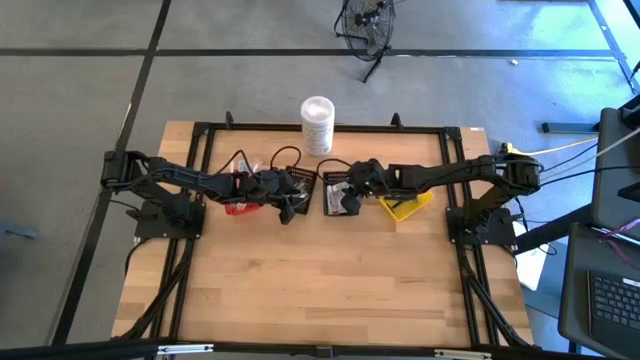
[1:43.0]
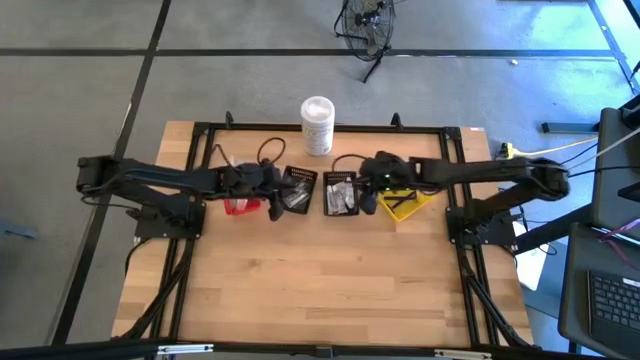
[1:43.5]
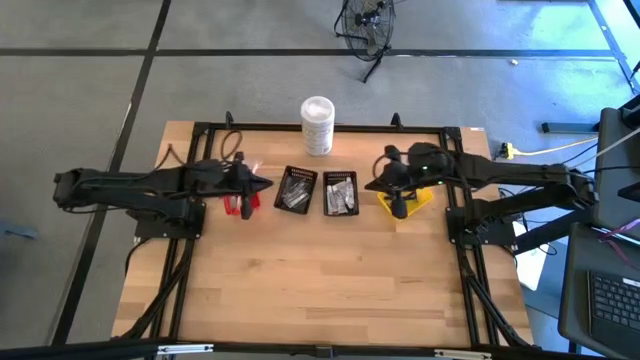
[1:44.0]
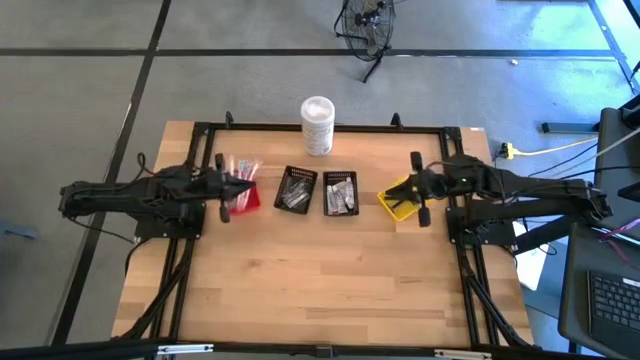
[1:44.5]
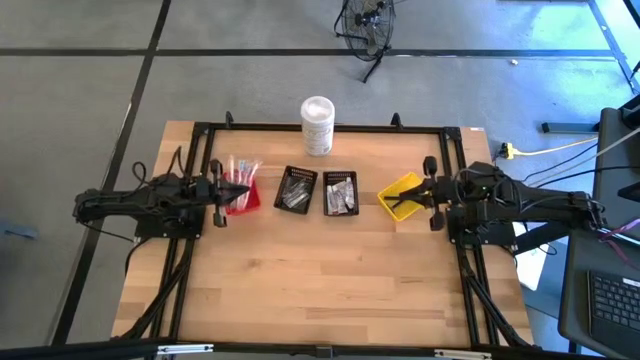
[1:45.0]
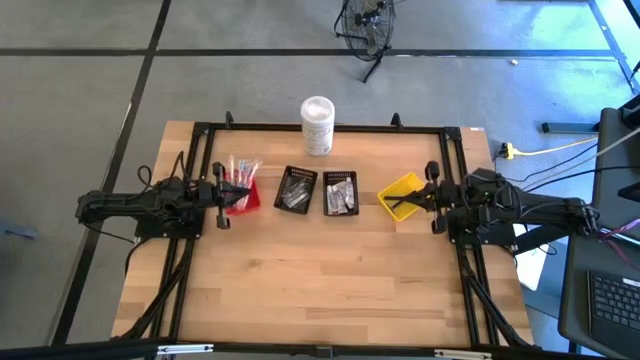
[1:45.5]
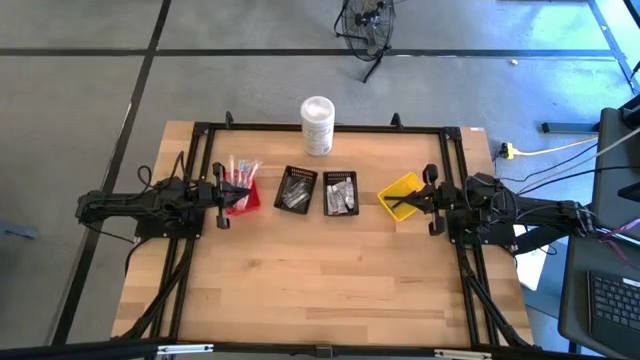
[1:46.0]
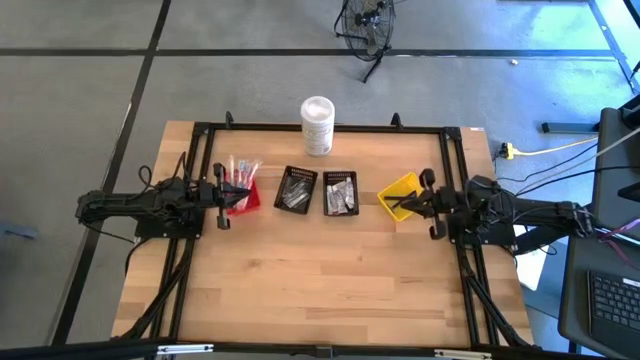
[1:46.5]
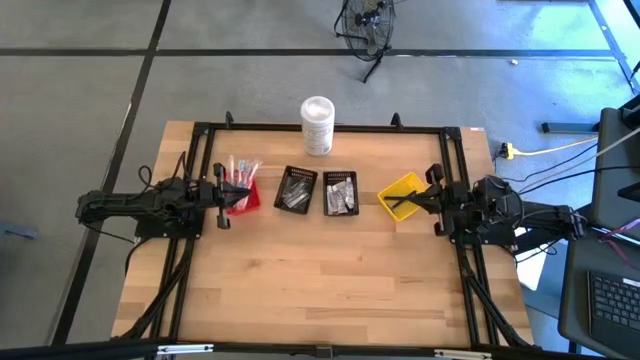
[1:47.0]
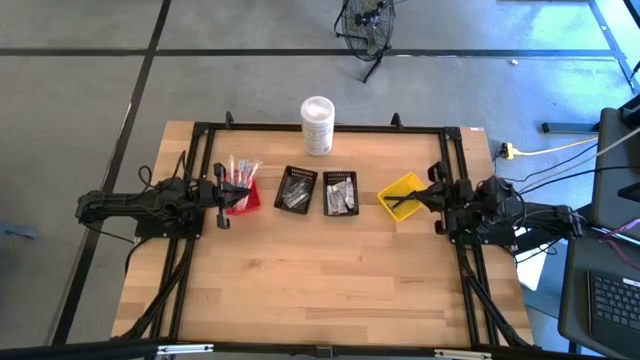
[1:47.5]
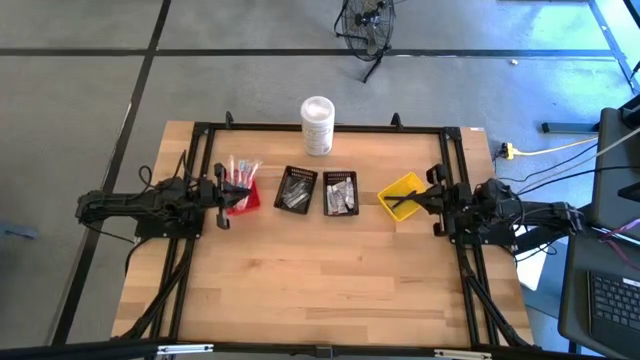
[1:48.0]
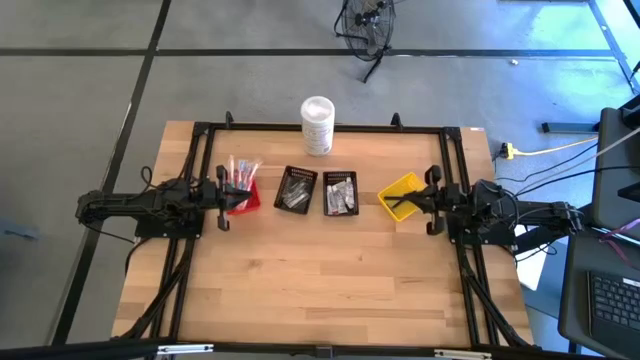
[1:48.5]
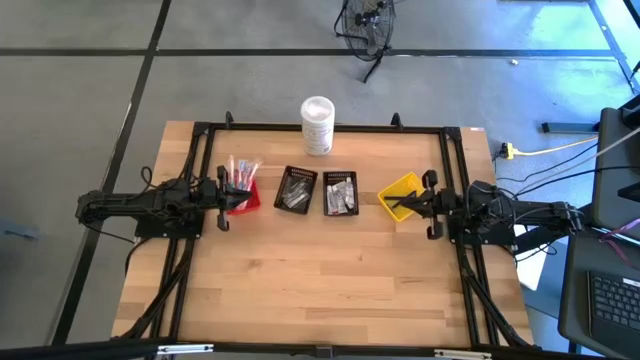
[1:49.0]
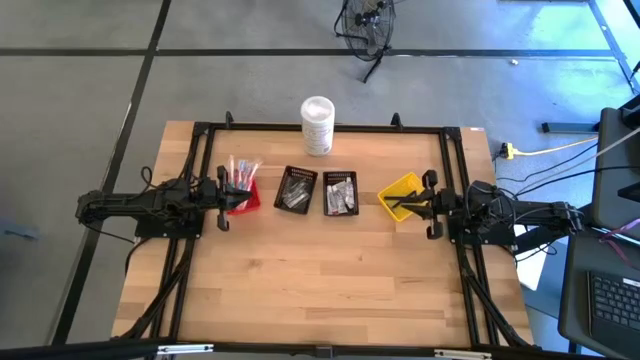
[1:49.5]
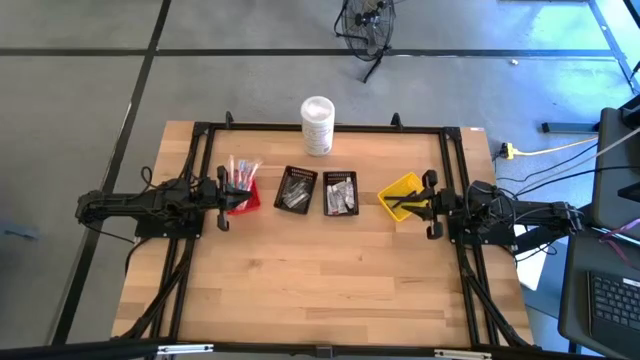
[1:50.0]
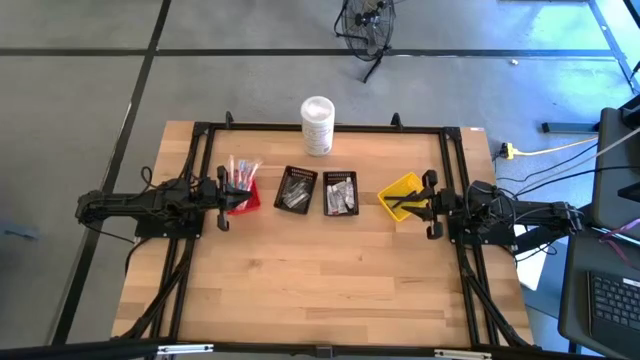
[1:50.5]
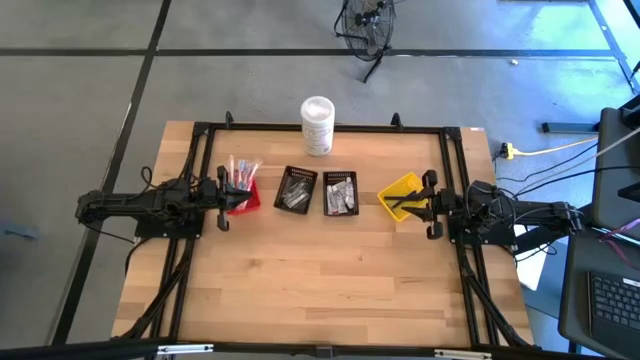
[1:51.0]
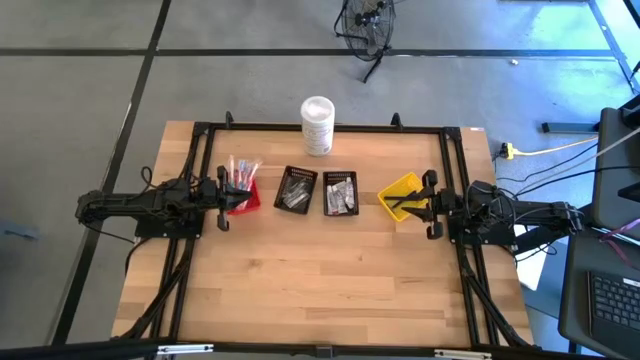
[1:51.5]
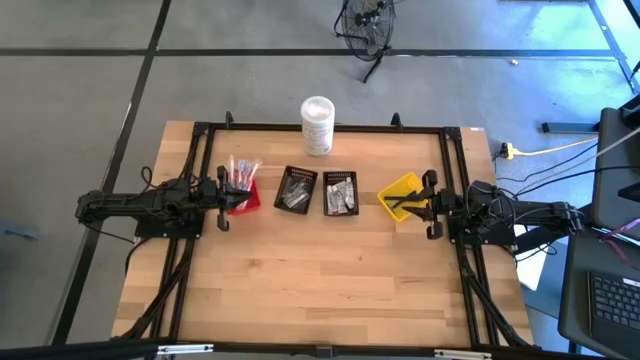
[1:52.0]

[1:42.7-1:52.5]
Task: Pick & Place Travel size toiletries
Return to Home Position

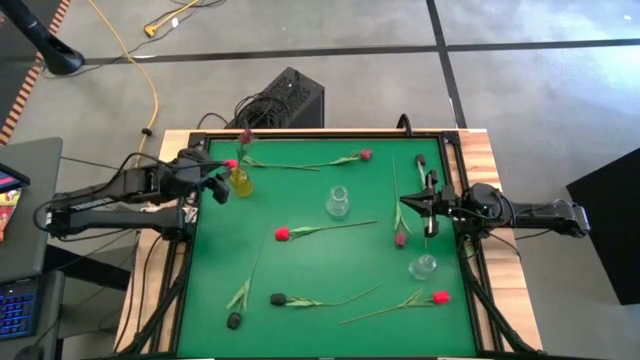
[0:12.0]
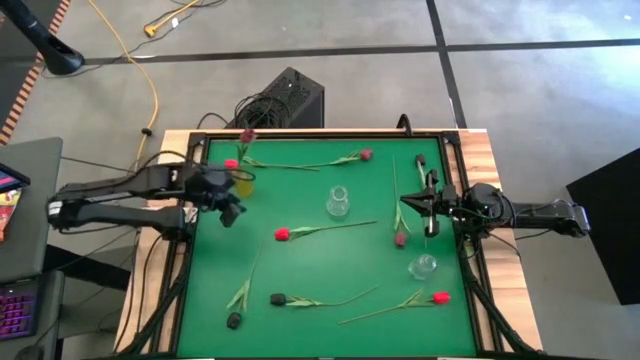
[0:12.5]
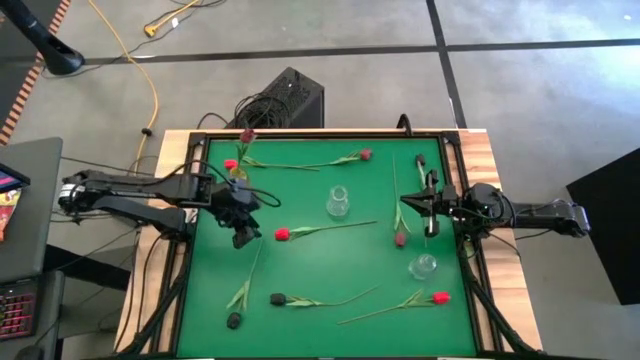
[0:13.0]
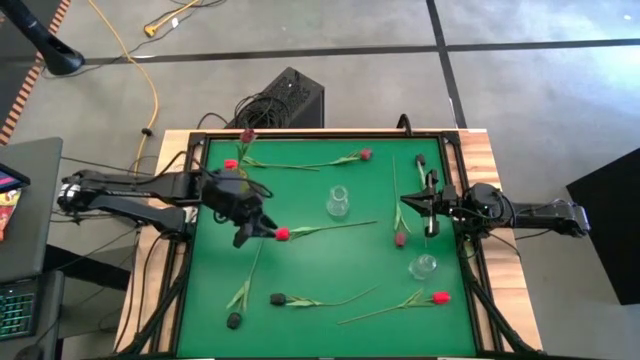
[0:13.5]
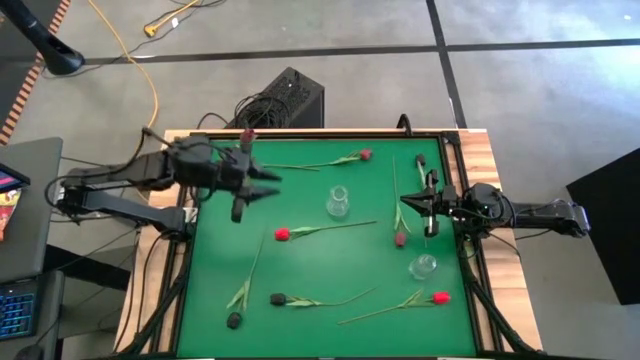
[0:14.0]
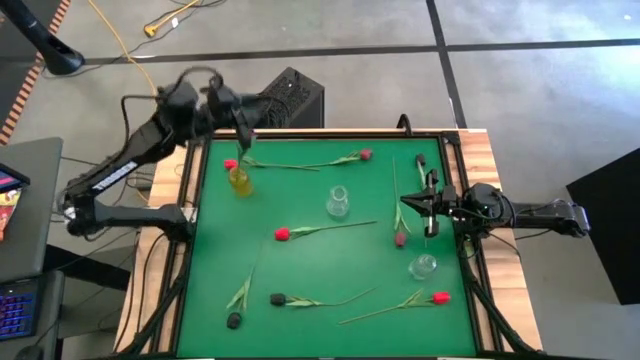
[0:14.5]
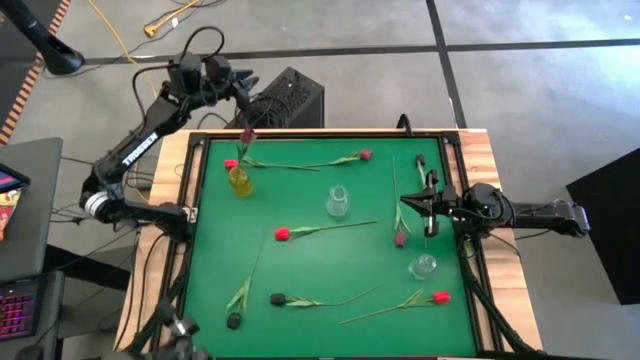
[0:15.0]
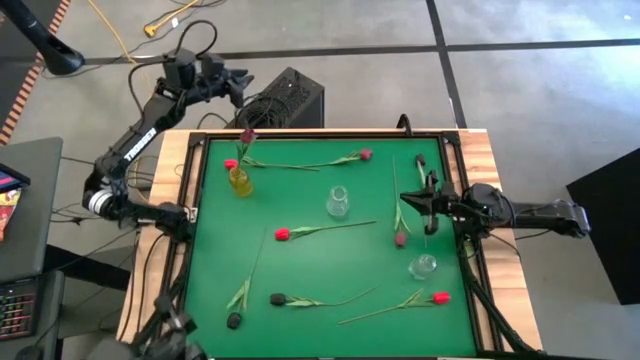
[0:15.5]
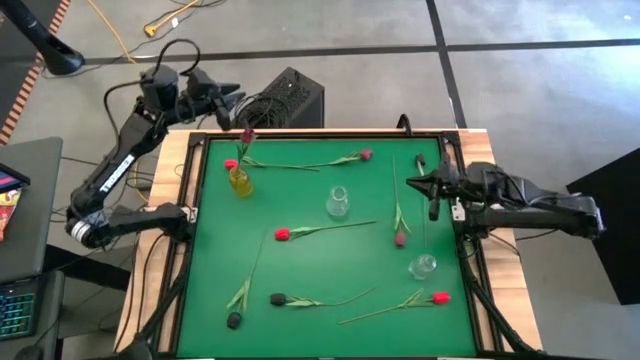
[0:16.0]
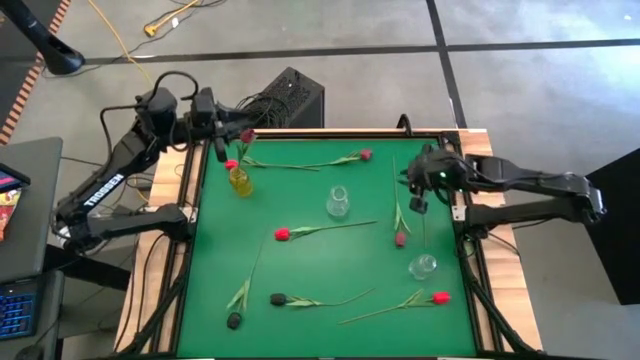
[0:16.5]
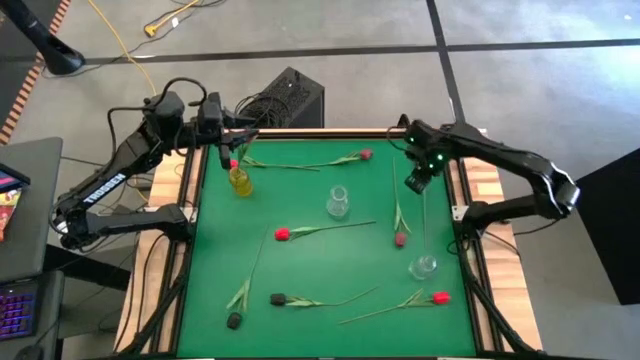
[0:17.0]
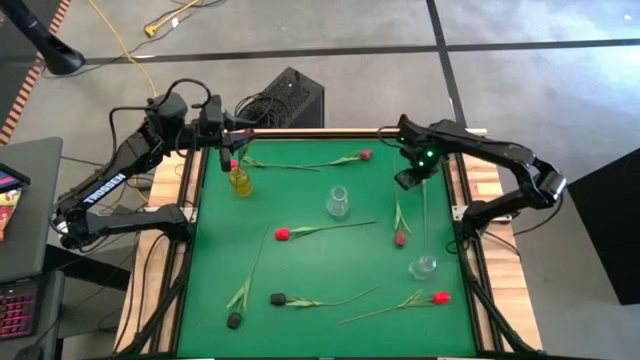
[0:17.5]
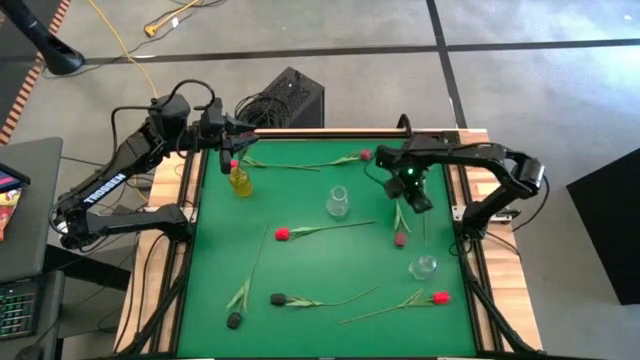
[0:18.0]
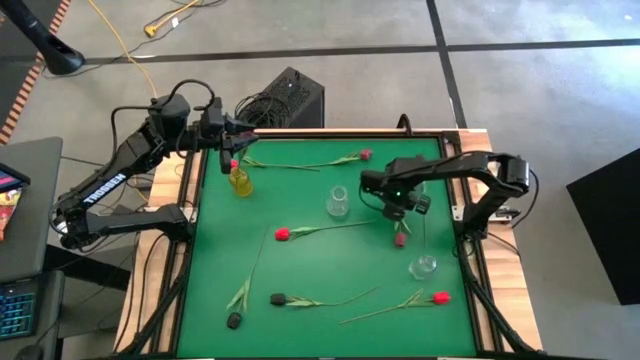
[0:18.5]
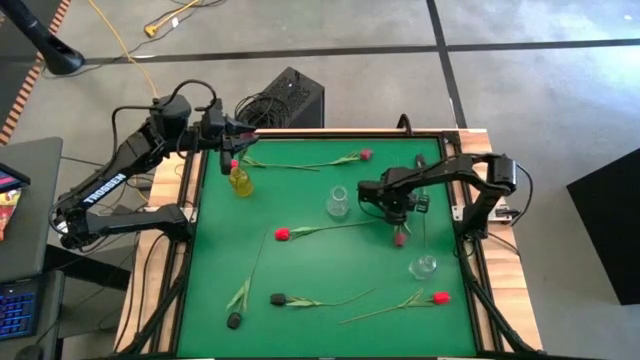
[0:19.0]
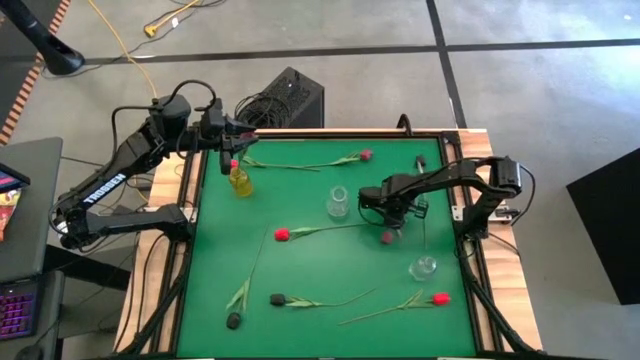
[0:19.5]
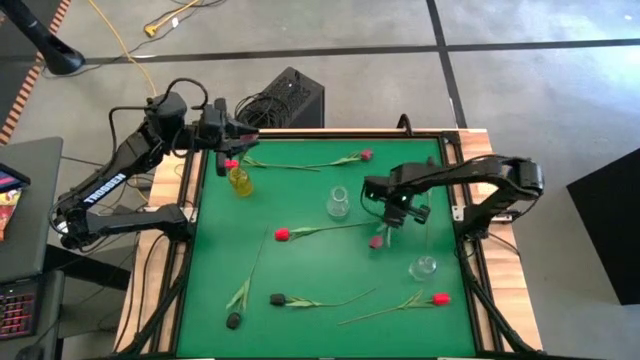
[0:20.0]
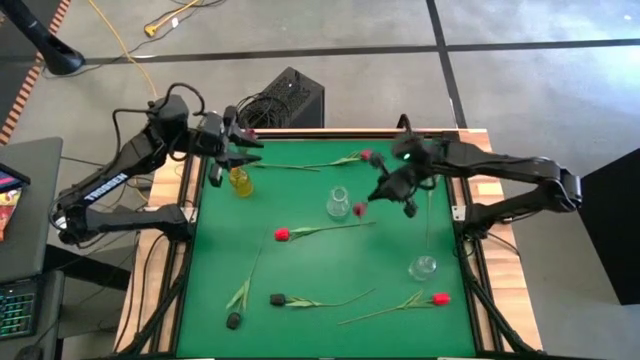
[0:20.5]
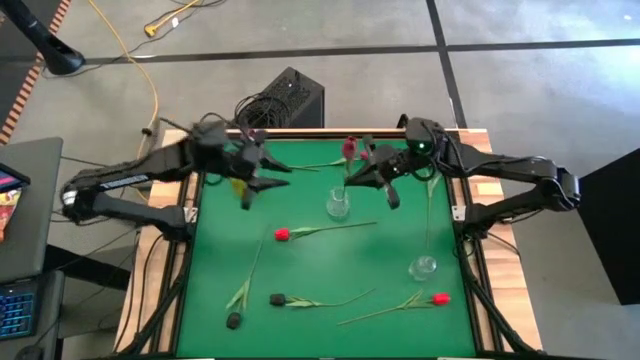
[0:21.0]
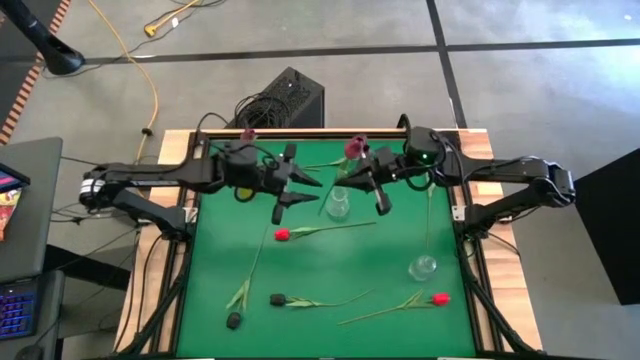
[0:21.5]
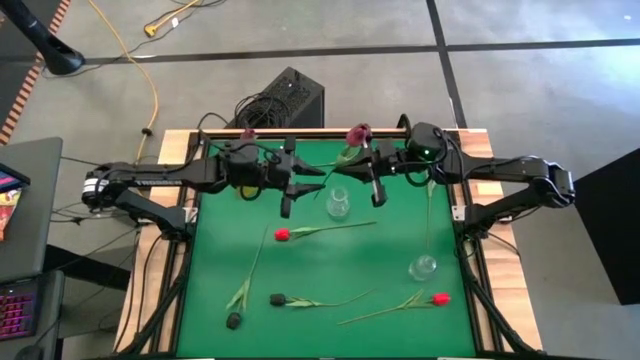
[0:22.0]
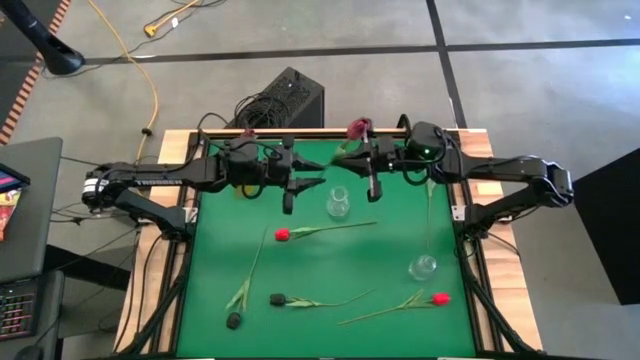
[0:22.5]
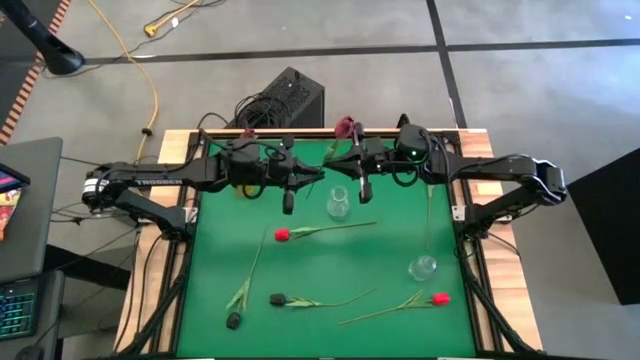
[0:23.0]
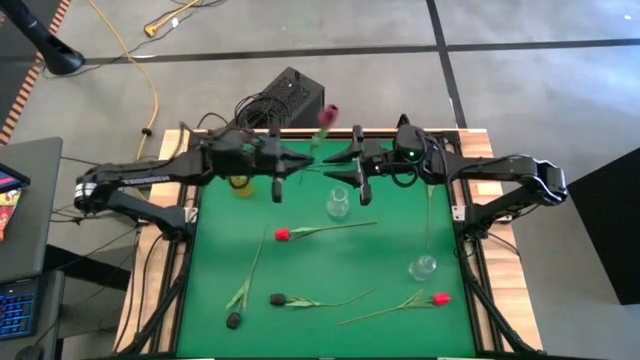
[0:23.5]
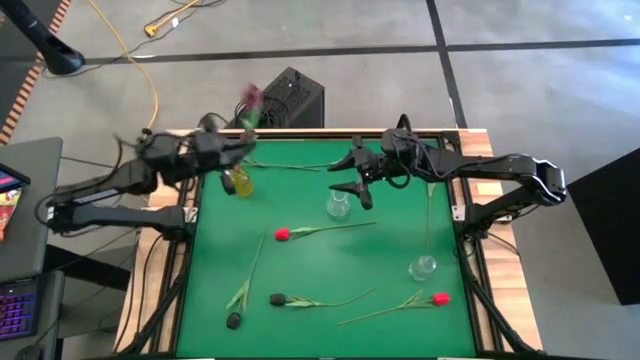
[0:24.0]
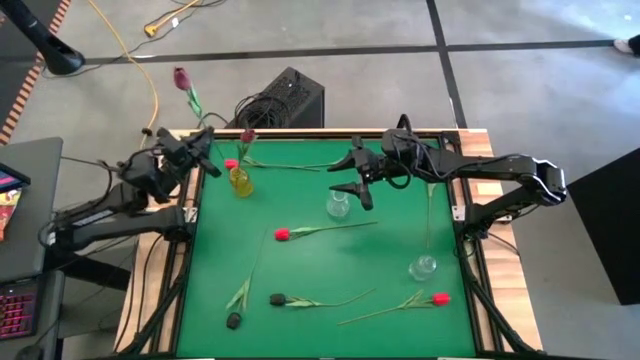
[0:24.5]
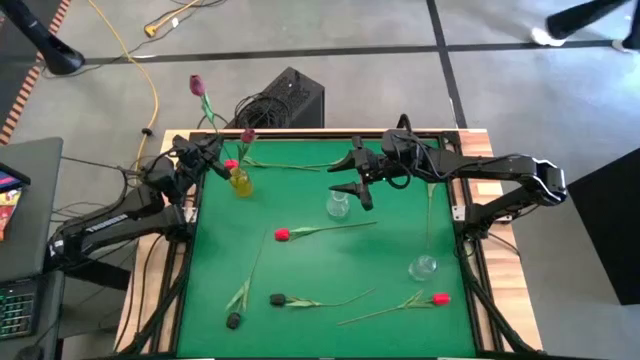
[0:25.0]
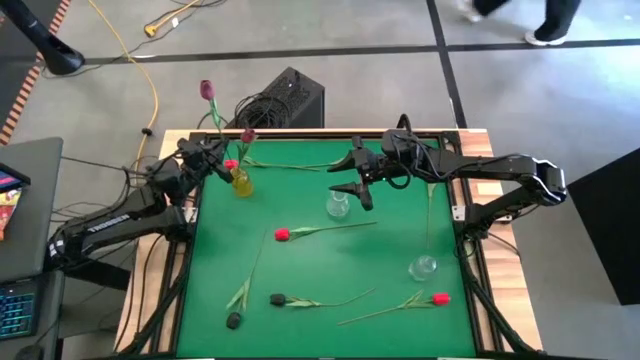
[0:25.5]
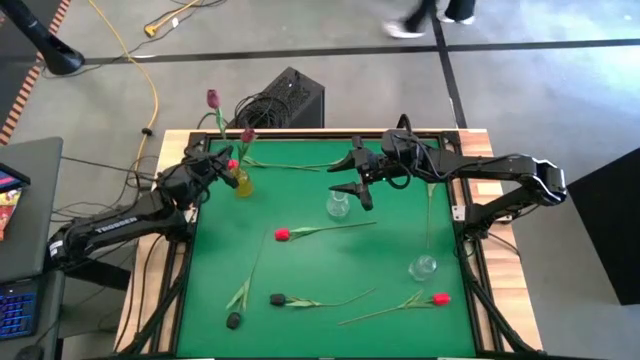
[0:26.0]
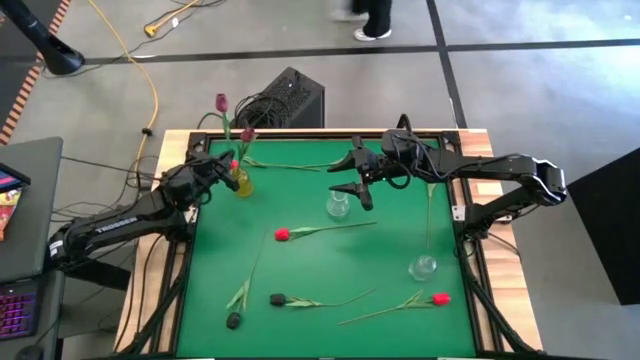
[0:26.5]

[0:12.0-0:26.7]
Task: Sort flowers into vase by color
Put the right dark red flower into the yellow vase
